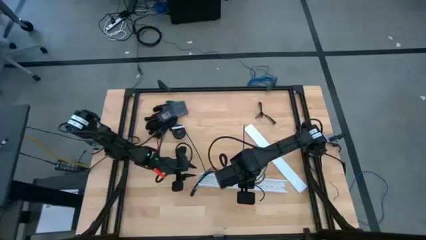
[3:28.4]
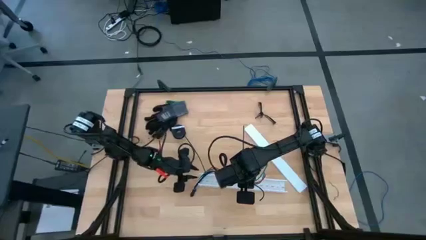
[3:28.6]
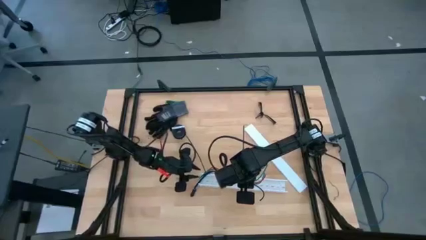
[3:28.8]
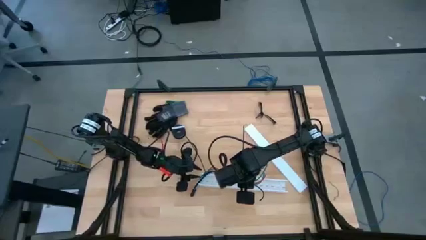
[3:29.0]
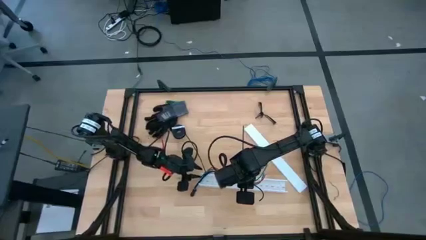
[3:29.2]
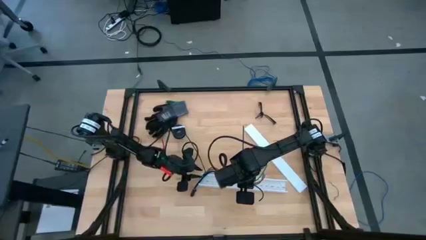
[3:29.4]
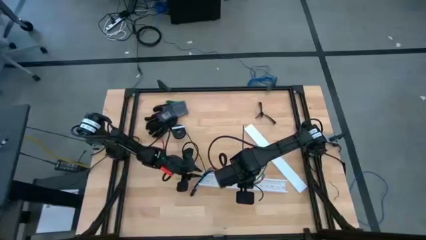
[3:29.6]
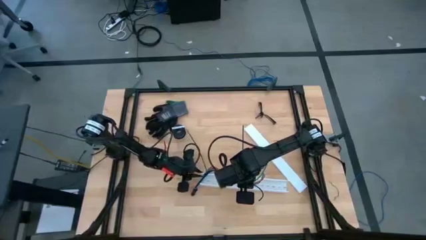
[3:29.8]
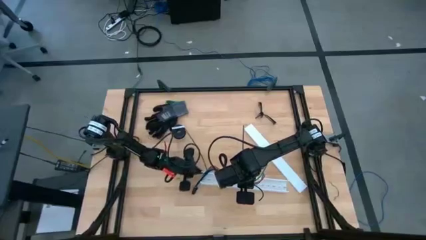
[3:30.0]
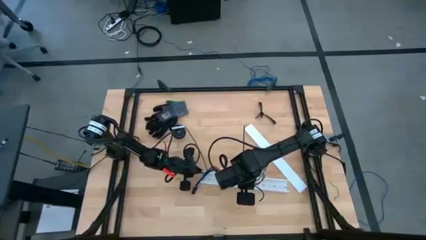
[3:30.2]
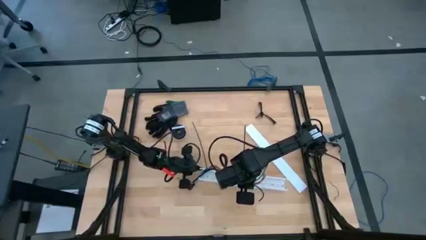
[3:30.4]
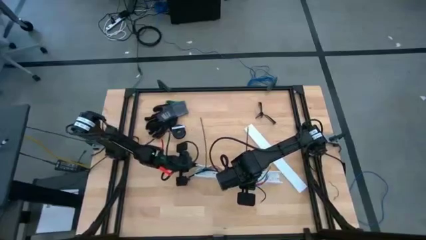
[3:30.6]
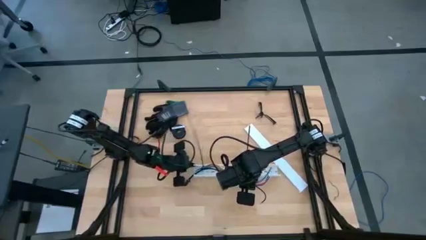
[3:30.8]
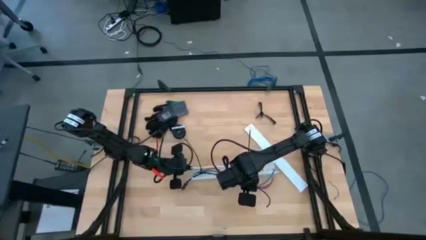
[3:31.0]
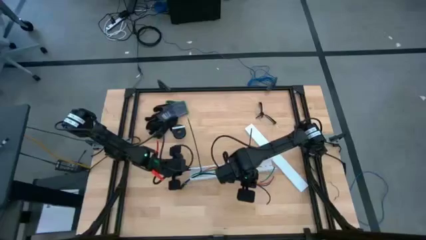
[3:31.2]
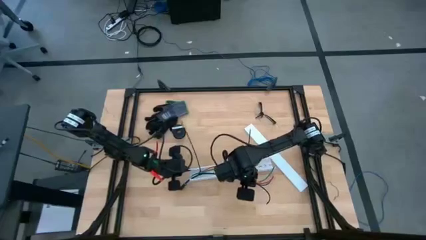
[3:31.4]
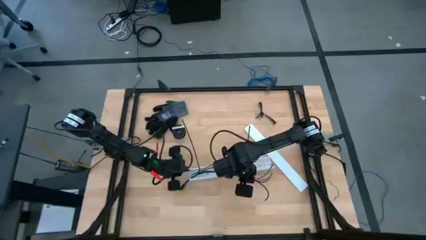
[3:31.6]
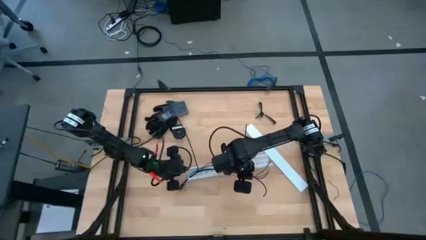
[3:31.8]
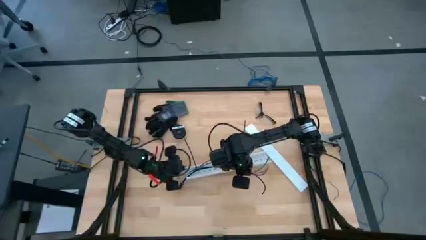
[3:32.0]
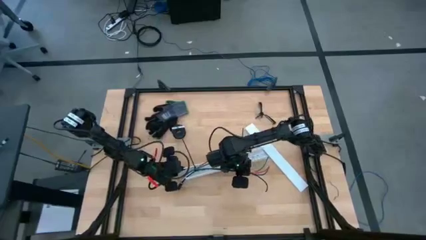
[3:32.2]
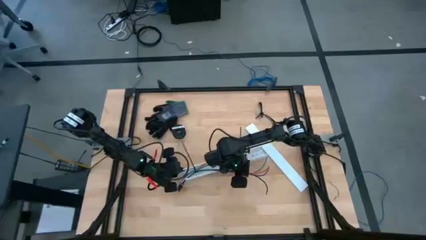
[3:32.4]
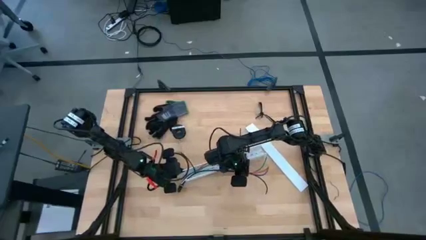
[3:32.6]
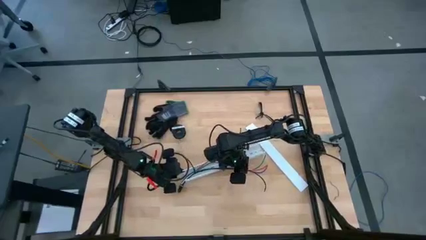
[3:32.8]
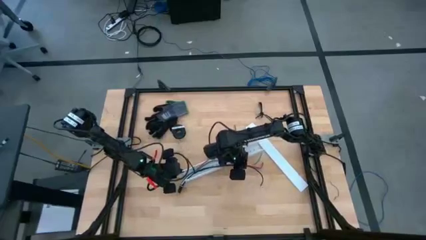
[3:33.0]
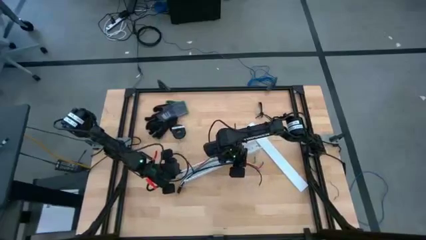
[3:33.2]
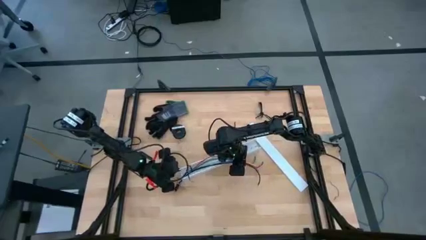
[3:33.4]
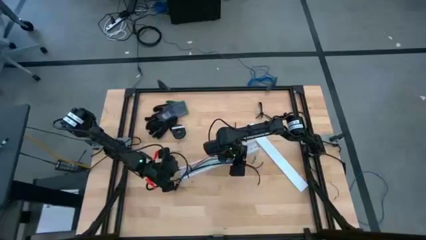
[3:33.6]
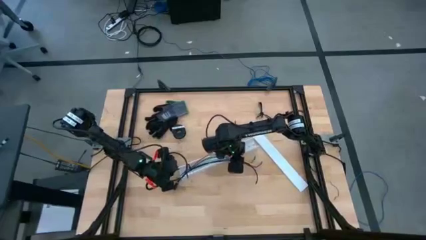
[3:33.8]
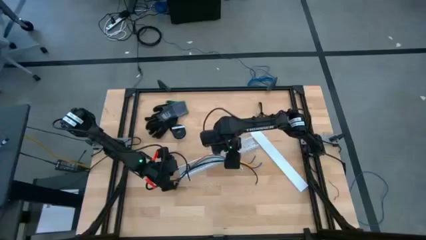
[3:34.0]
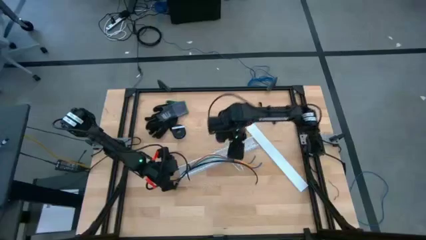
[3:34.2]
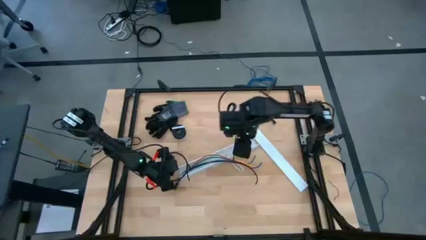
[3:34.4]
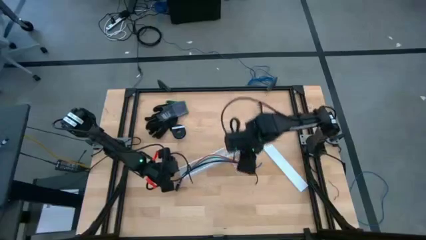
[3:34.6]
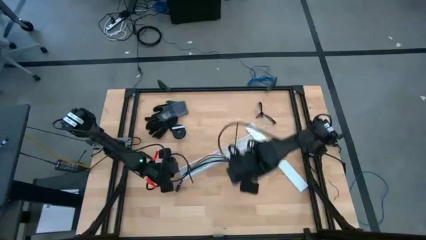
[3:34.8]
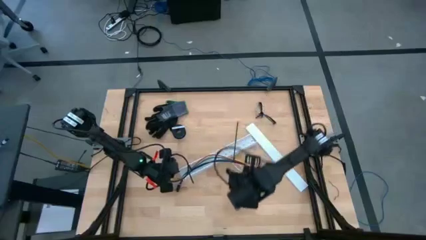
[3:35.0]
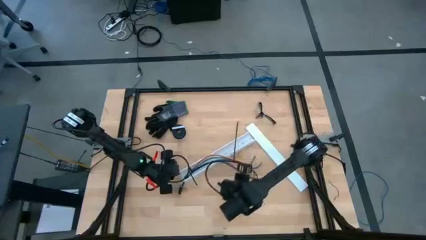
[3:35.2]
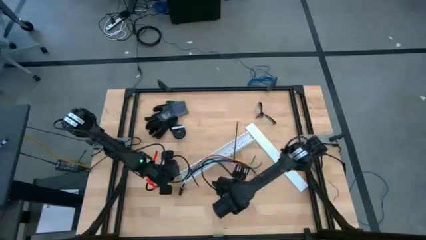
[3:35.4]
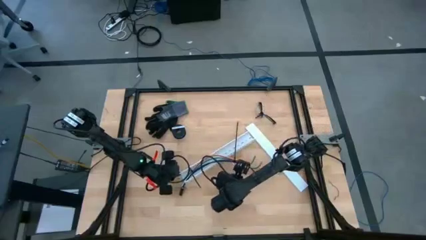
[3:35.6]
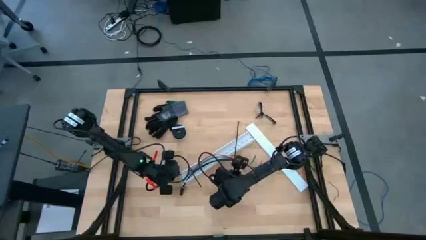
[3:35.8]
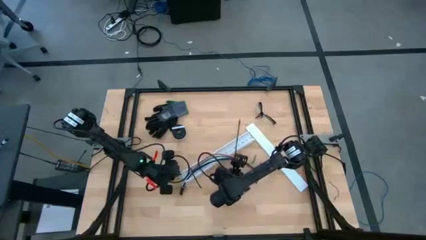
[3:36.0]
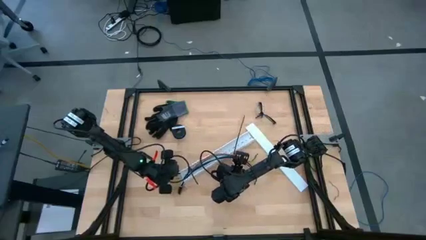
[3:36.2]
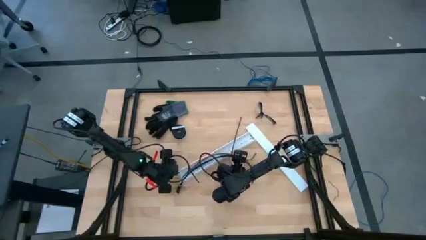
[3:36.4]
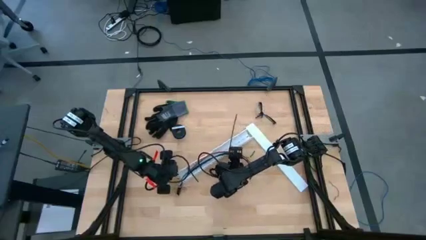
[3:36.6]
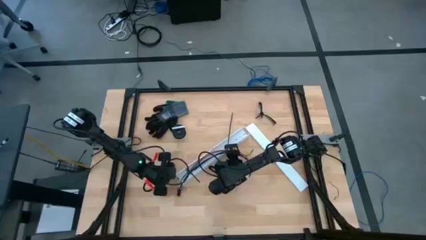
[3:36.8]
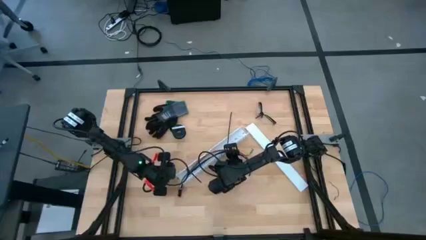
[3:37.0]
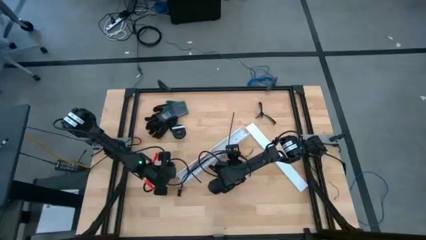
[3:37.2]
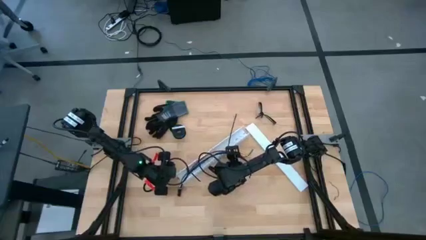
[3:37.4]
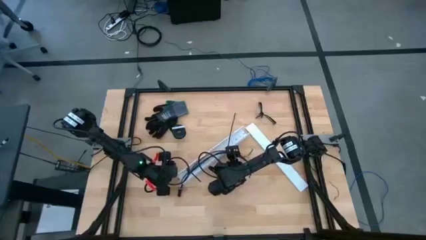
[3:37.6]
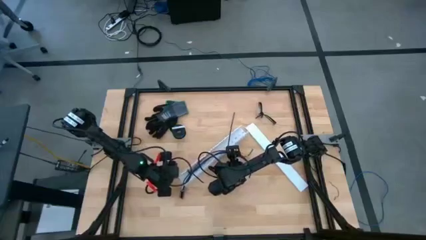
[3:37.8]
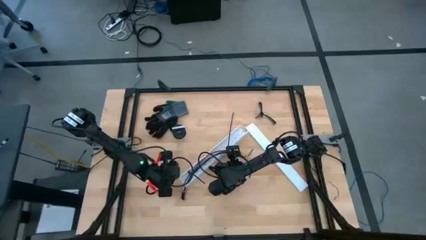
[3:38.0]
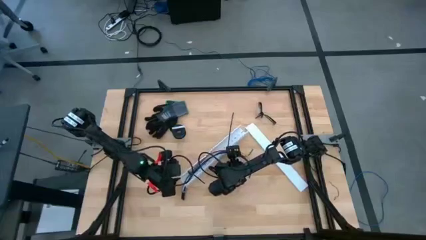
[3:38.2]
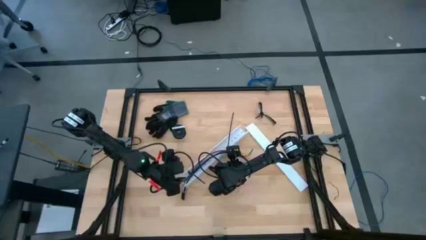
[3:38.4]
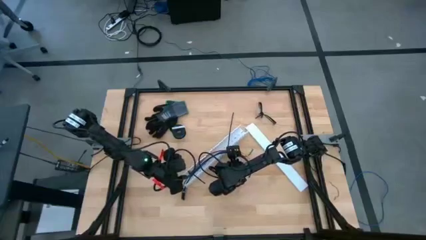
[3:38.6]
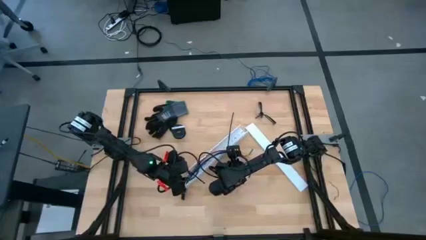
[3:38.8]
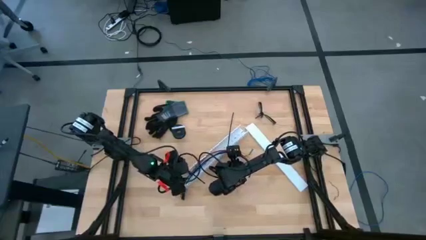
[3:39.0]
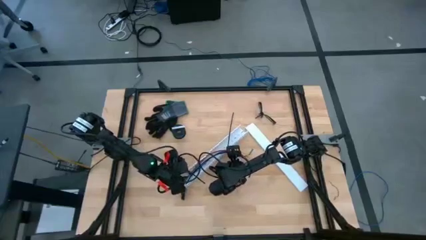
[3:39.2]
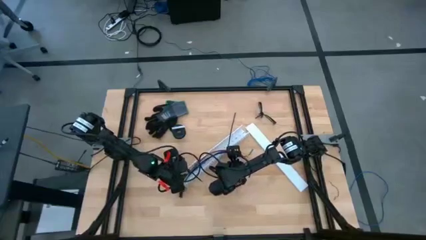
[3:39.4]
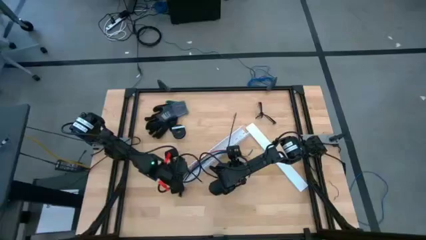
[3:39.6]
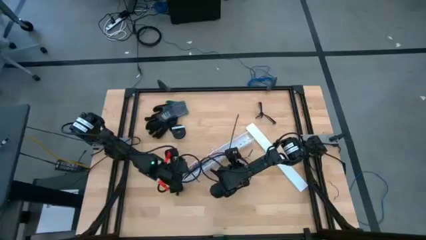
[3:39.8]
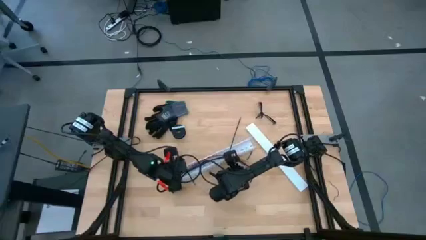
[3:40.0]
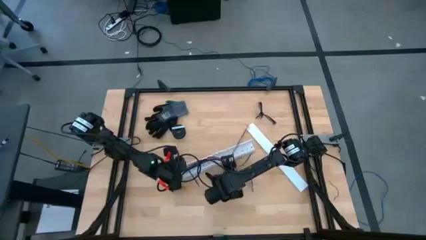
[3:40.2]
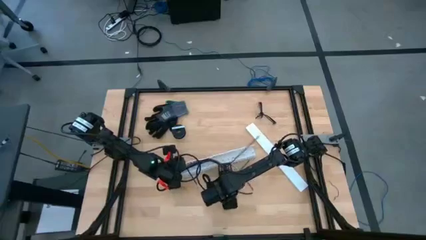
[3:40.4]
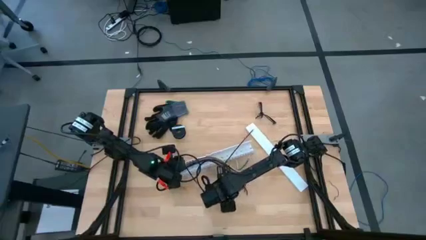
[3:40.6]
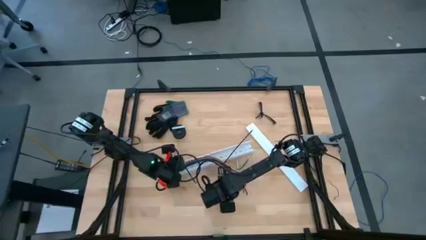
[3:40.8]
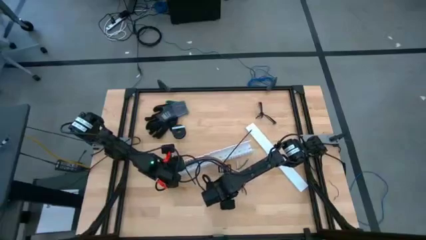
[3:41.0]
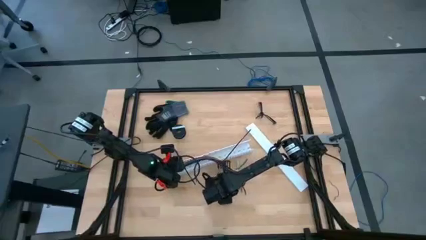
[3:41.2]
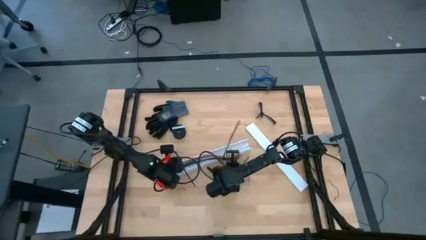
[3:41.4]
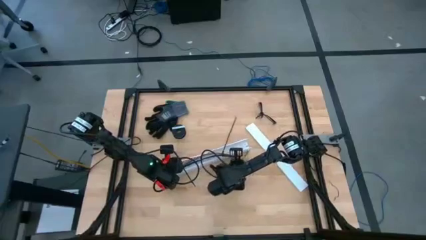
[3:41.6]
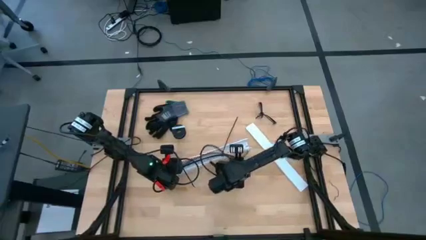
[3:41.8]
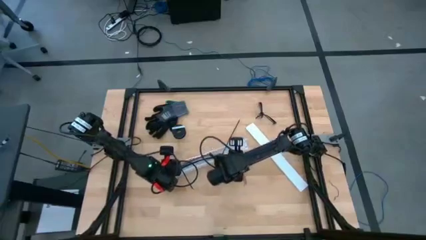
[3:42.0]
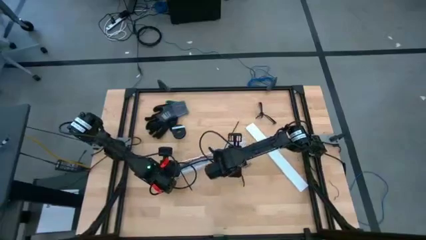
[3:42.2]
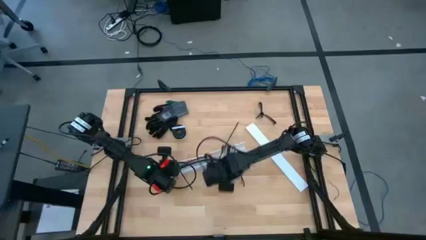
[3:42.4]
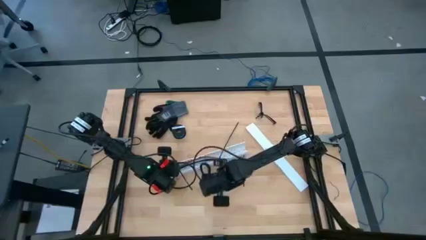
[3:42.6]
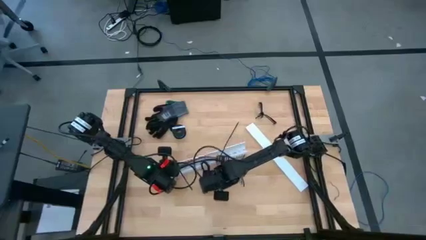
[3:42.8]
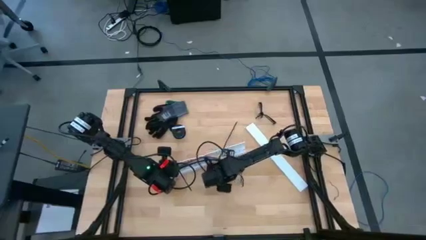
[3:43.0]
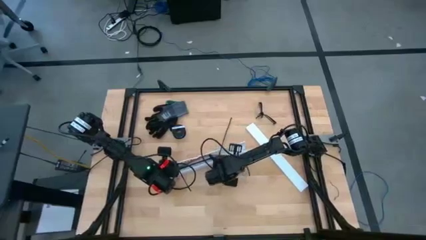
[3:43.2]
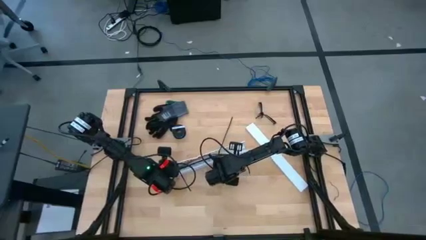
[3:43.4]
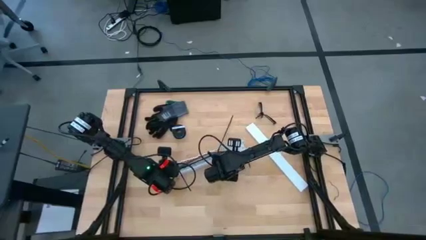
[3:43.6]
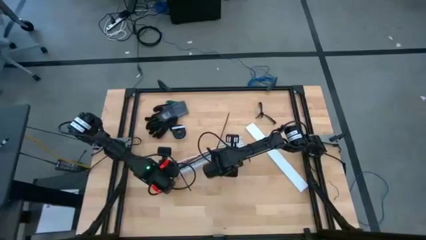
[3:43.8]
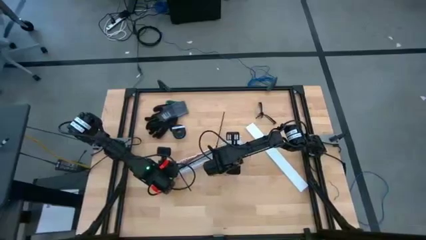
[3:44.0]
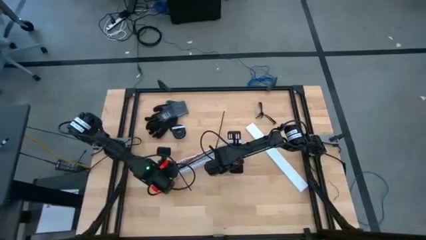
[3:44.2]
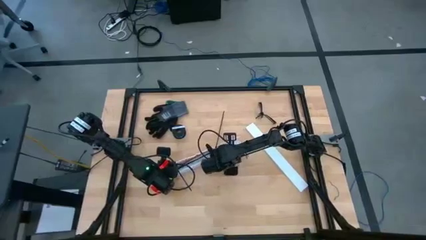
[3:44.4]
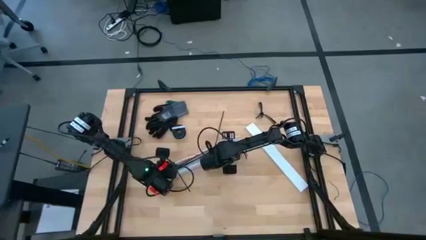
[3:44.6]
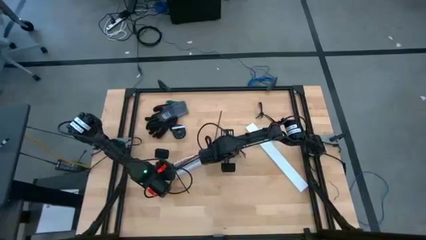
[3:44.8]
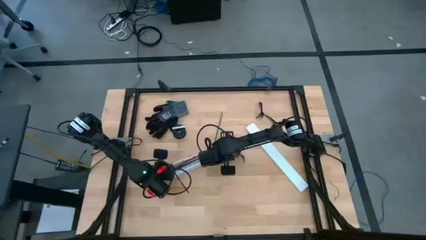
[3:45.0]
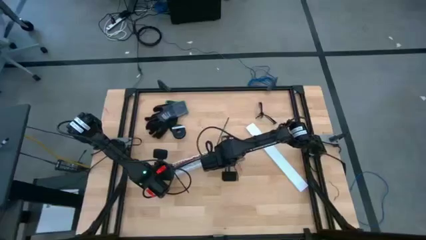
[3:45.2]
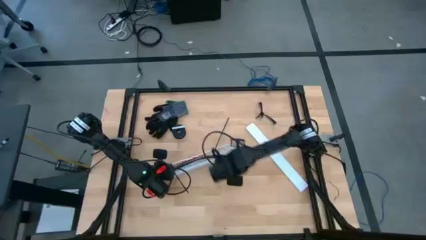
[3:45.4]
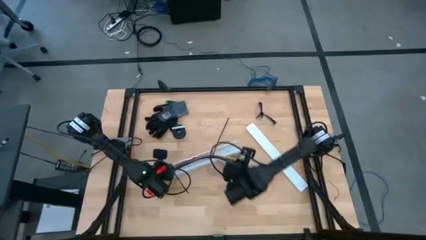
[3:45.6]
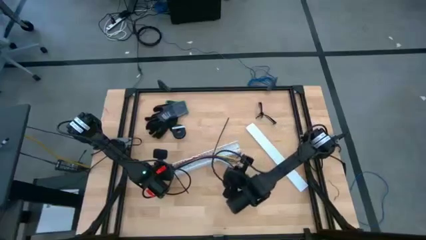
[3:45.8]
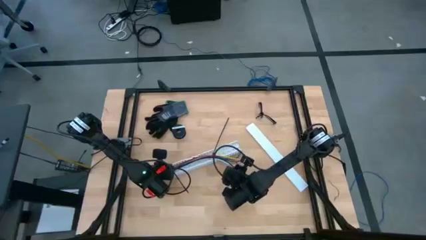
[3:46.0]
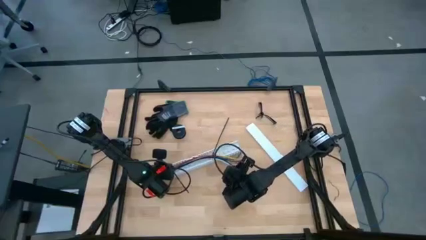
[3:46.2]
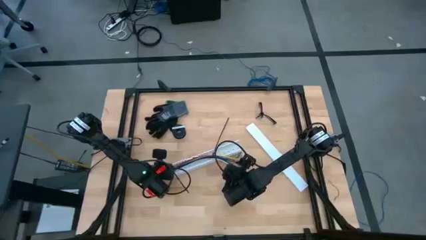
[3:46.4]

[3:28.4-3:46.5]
Task: Ziptie cables
Put the zip tied cable wires into the white cable duct
